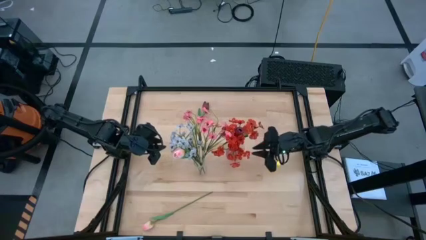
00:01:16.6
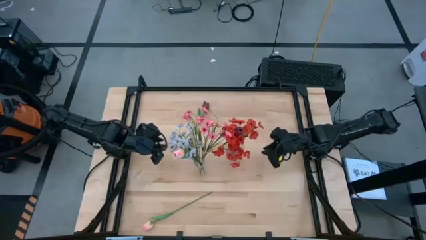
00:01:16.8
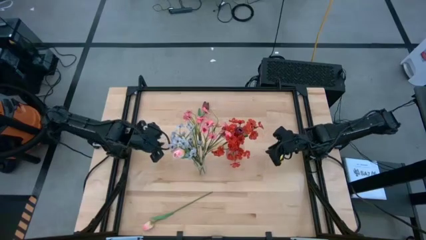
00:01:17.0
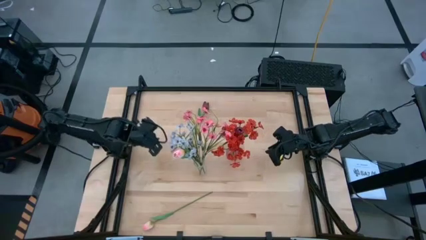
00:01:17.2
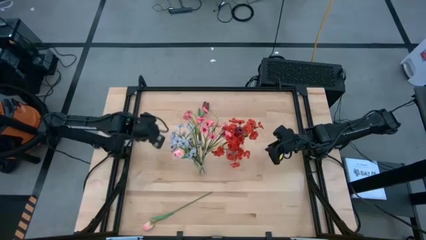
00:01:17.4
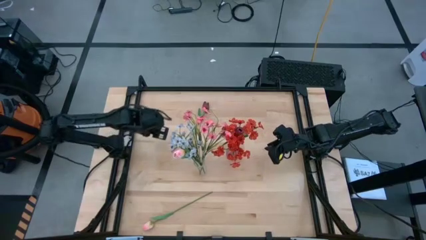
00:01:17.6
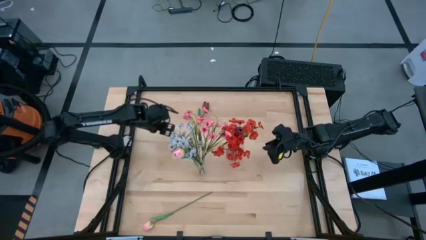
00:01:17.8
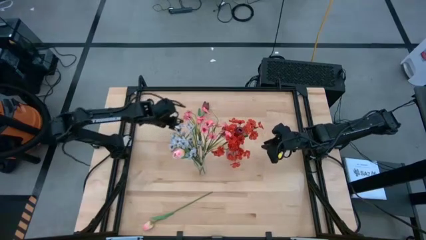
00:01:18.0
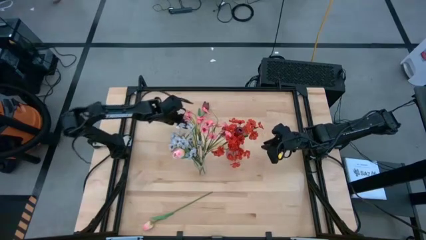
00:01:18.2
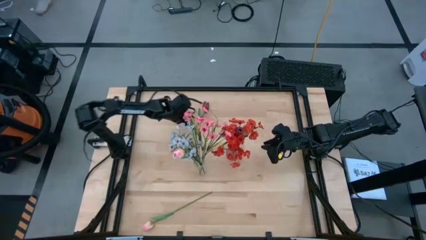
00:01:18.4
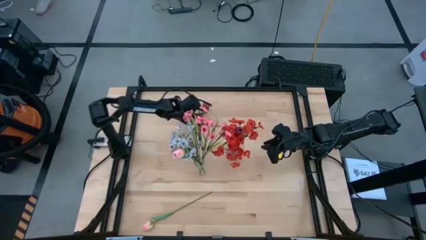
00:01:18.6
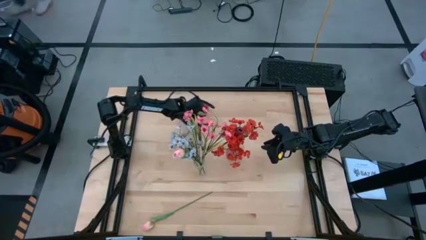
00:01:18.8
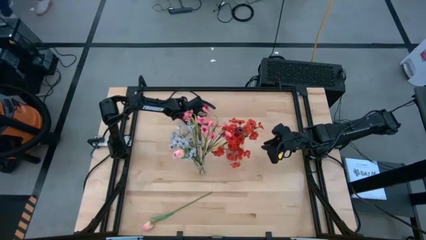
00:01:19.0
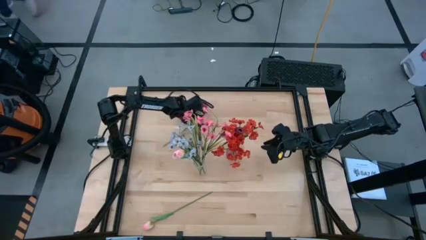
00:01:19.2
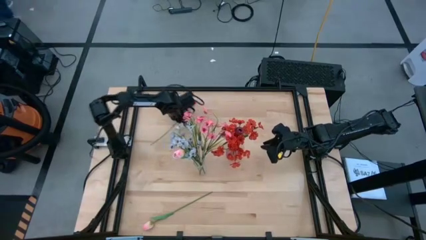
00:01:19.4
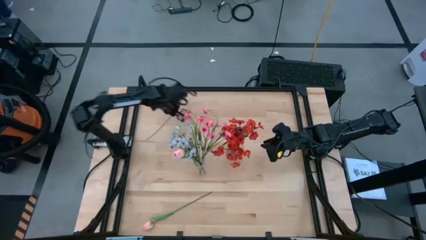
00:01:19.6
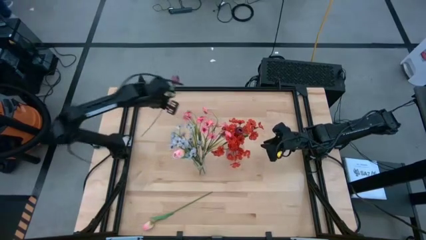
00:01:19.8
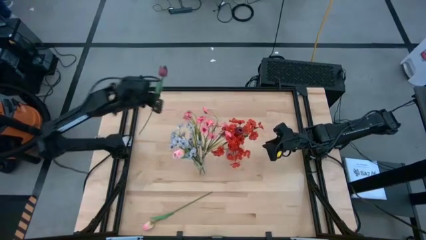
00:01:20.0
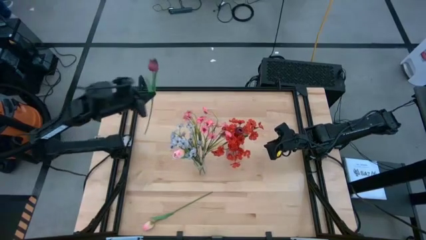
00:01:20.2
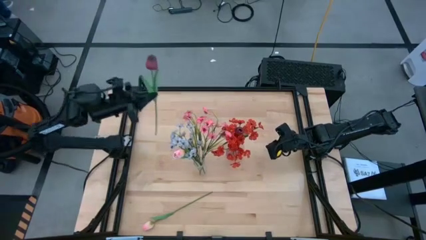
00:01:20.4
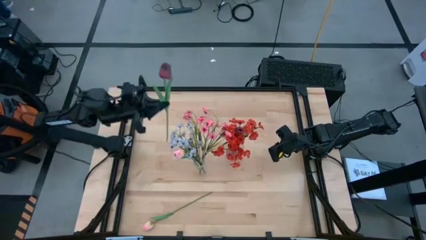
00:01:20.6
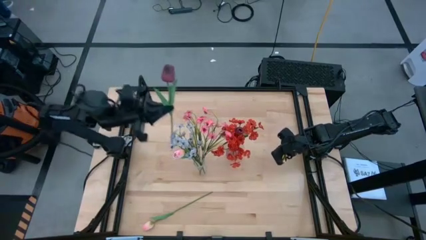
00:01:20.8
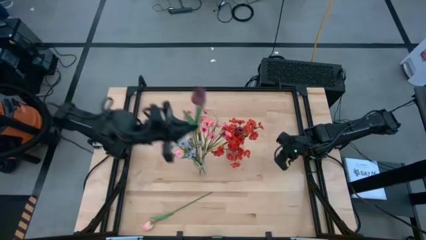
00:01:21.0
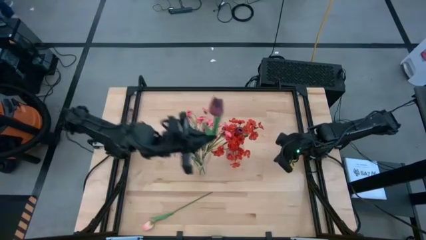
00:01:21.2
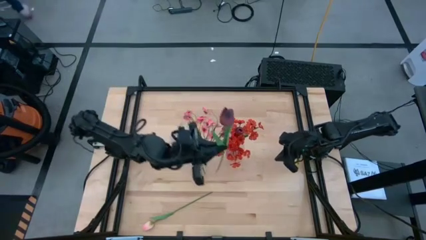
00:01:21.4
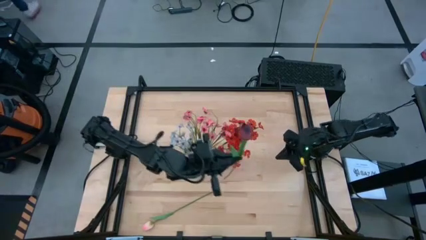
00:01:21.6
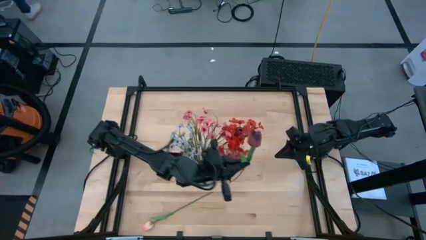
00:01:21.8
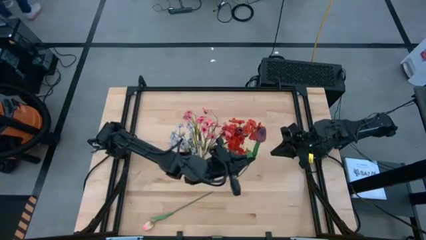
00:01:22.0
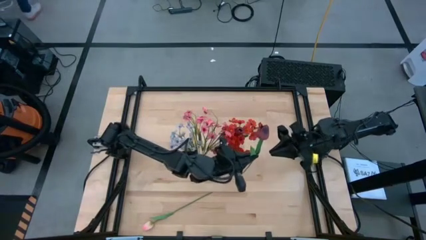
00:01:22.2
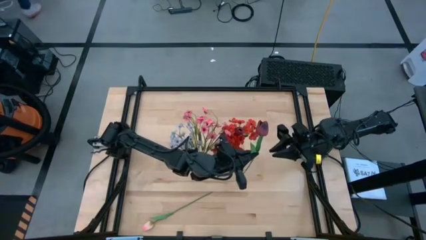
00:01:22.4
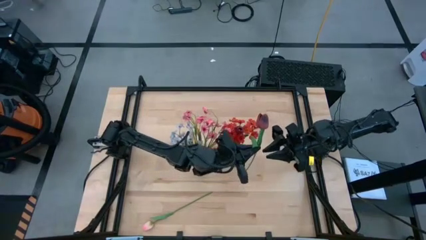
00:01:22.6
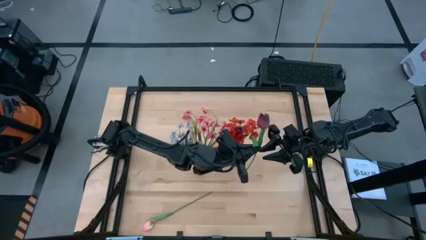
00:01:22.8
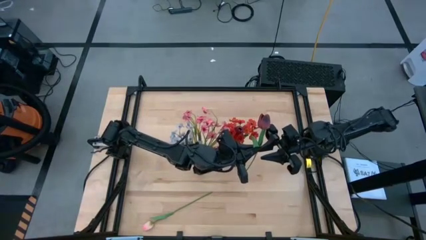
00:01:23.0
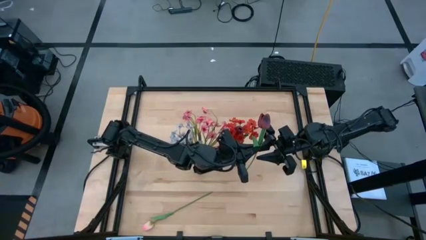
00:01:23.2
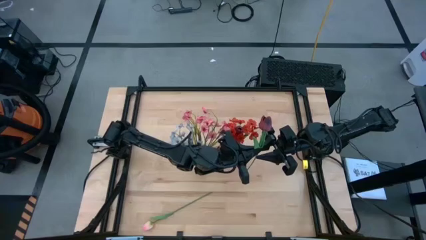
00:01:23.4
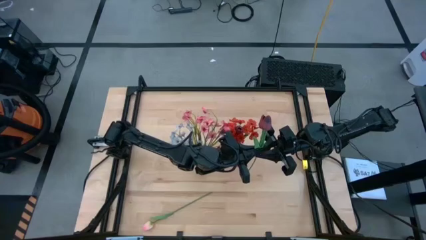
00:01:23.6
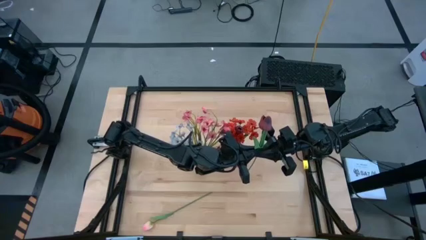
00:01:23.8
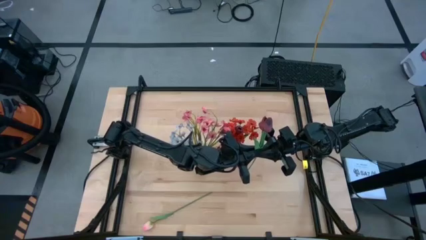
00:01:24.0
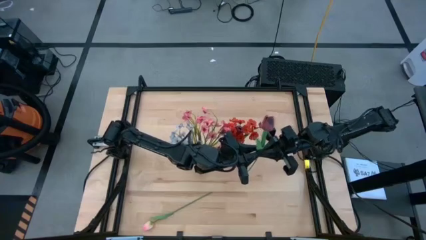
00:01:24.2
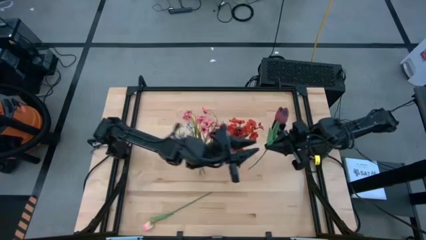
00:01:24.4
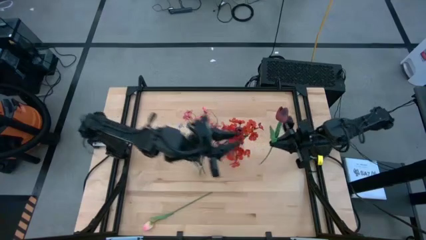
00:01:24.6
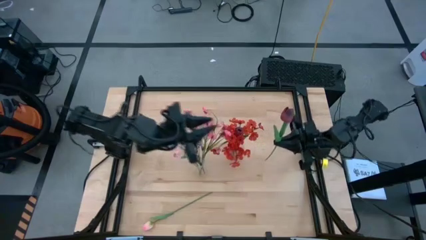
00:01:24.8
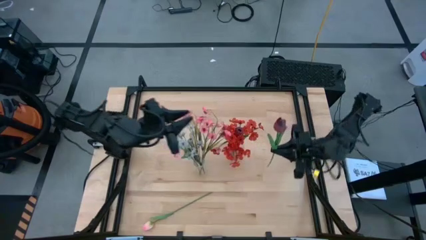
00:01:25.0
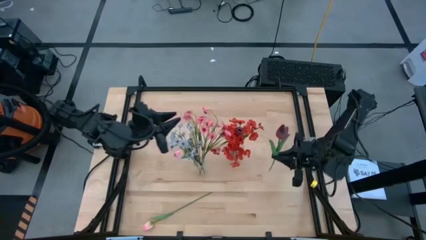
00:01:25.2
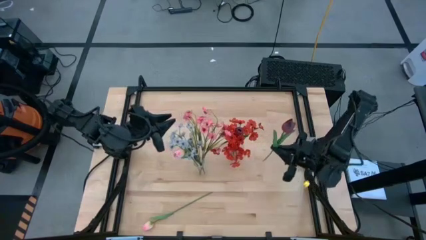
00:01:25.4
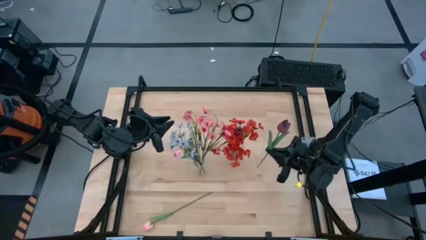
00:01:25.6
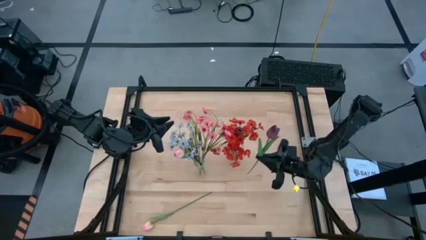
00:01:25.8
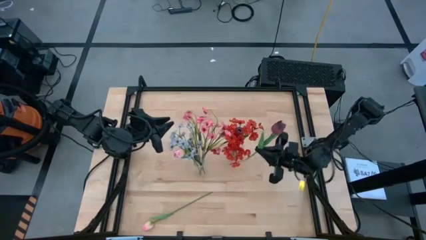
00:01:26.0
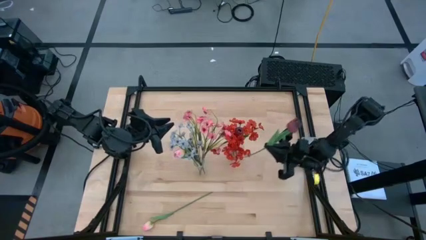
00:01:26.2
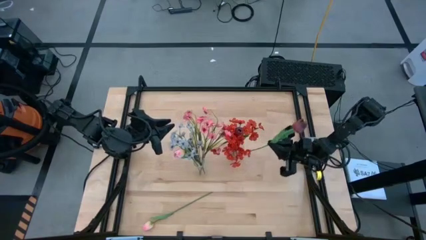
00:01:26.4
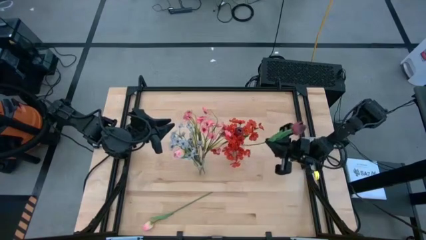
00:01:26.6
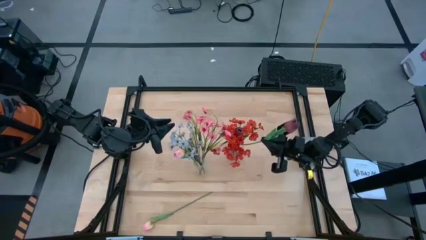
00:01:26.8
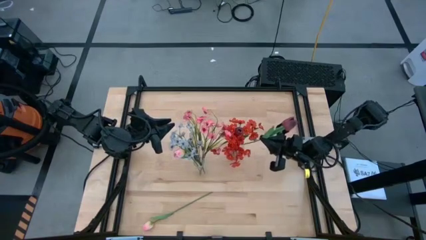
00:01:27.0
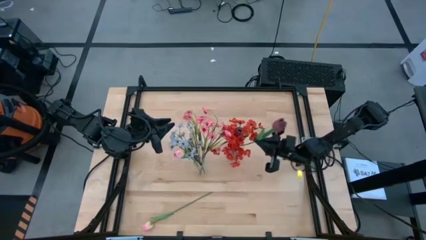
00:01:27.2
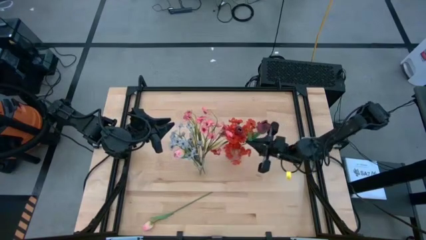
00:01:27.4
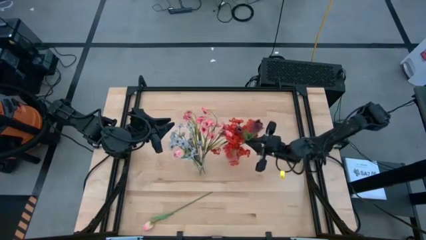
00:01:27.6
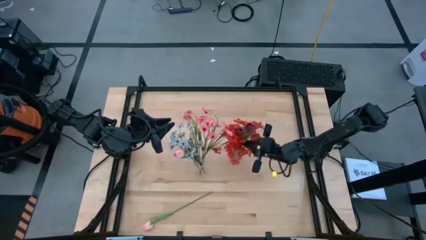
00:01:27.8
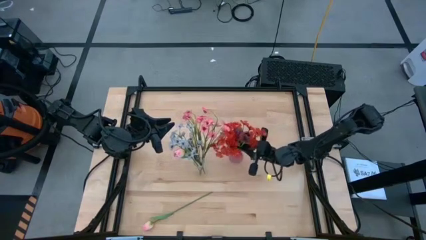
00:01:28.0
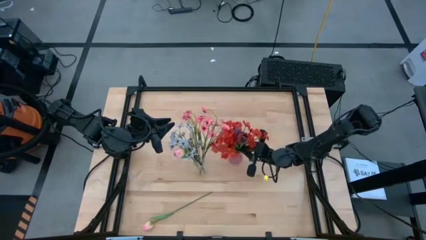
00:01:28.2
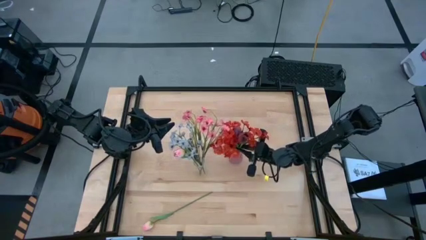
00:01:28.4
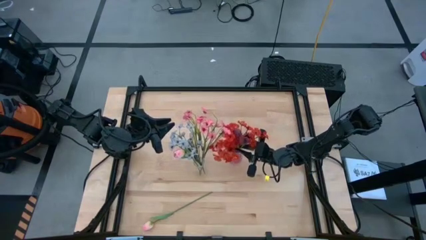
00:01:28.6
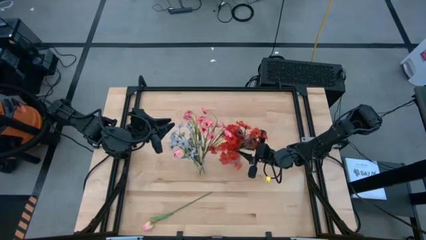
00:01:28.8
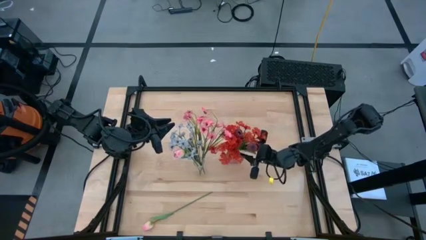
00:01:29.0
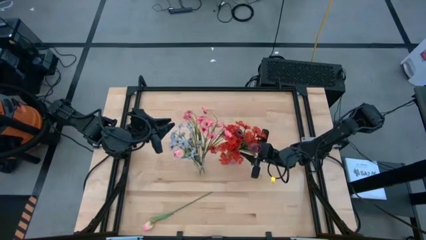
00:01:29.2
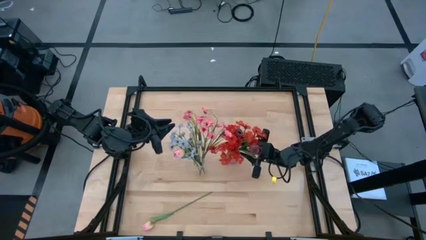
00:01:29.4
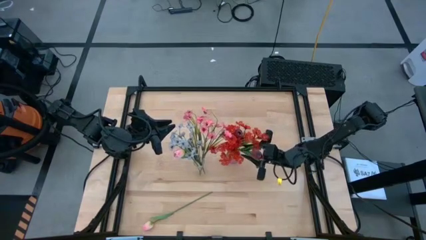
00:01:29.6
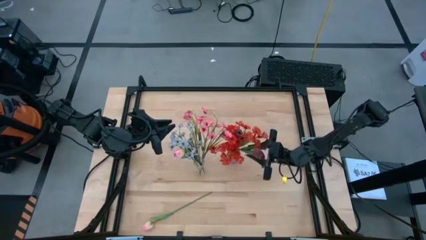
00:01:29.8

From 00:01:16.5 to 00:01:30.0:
Task: Sort flowers into vase by color
Put the dark red flower into the purple vase
